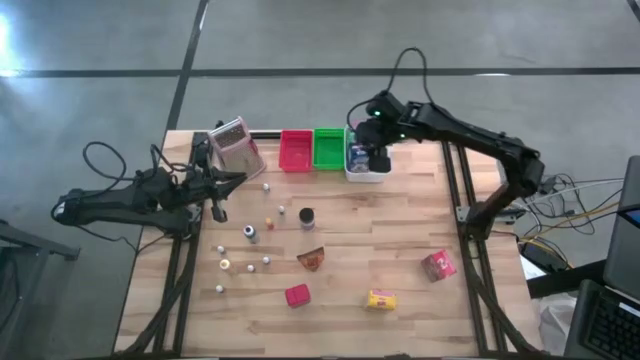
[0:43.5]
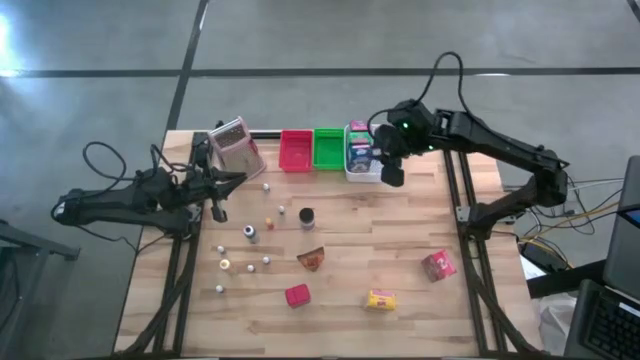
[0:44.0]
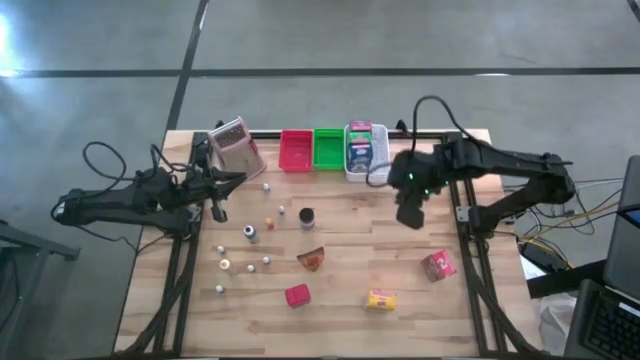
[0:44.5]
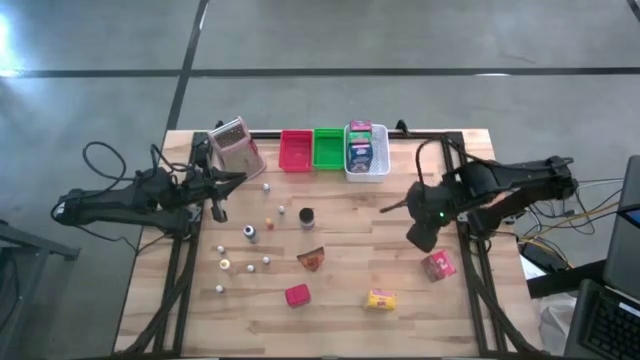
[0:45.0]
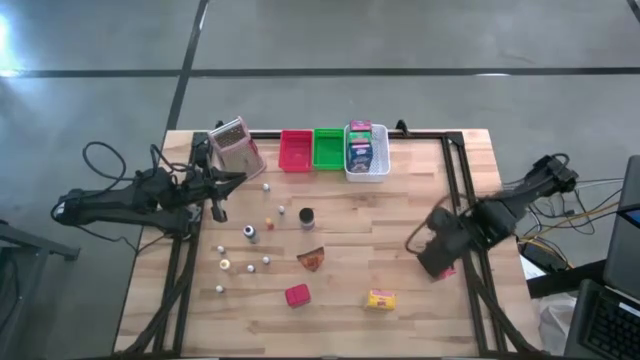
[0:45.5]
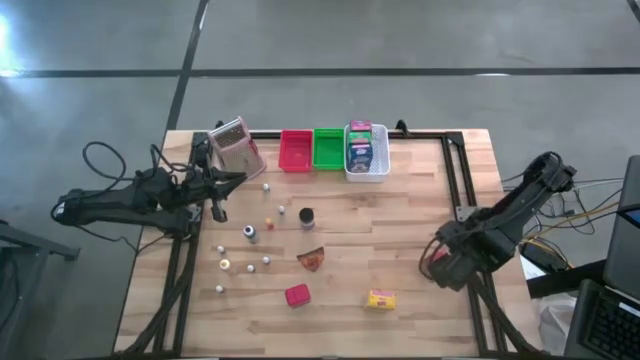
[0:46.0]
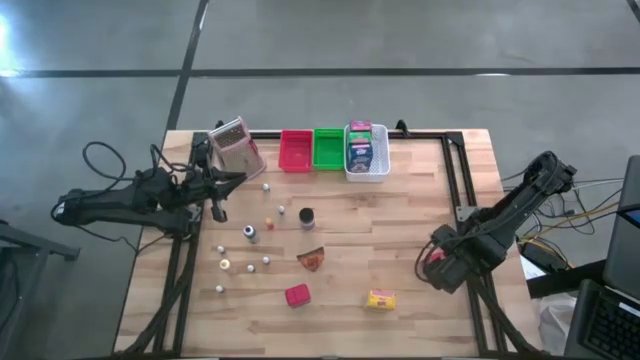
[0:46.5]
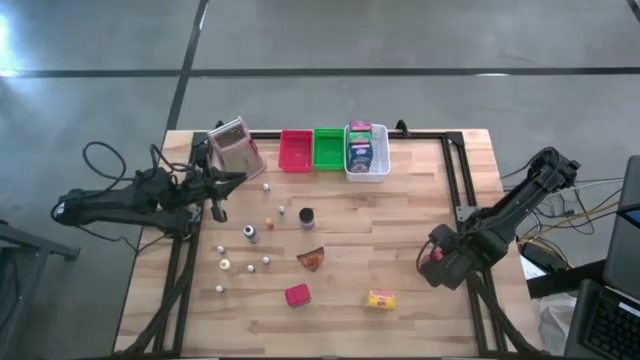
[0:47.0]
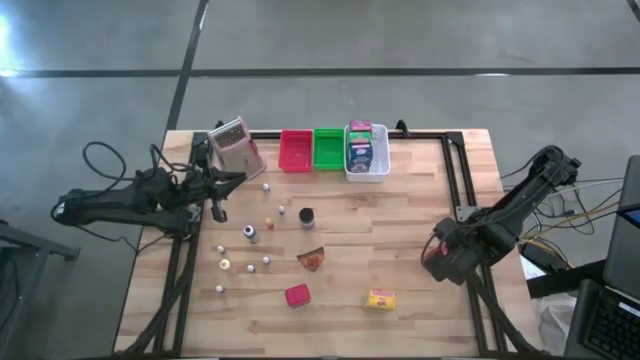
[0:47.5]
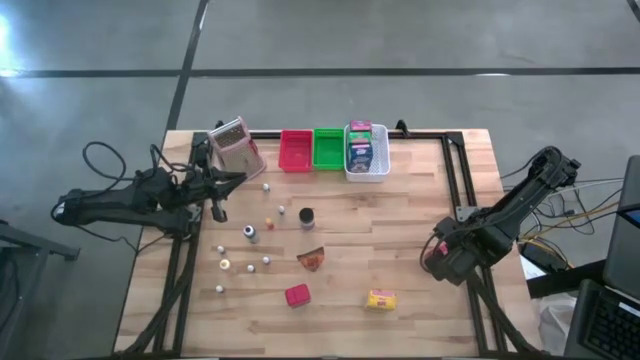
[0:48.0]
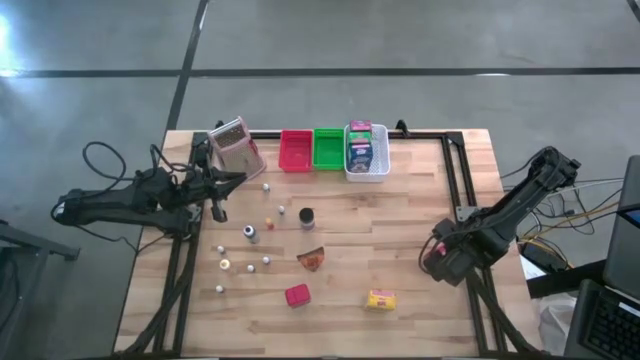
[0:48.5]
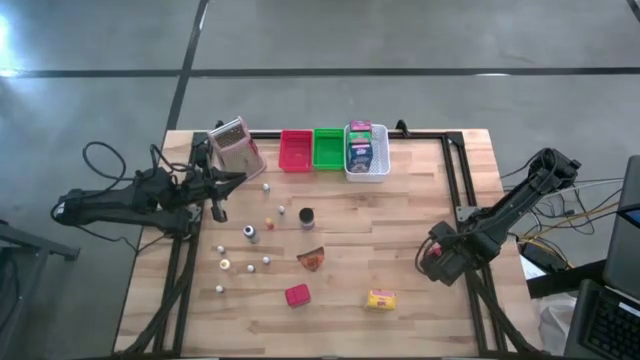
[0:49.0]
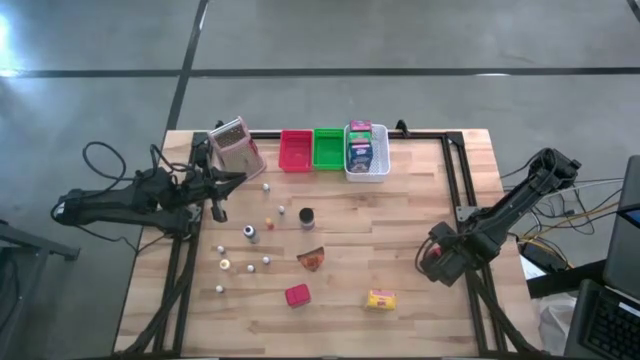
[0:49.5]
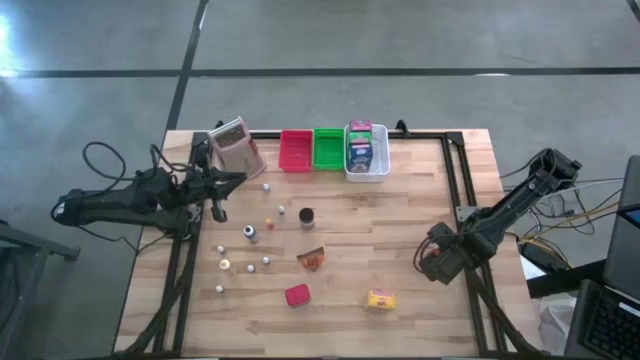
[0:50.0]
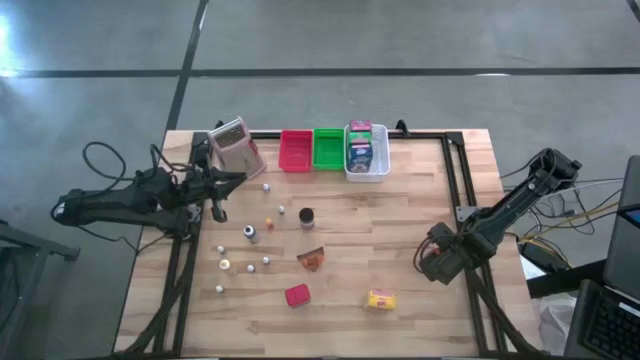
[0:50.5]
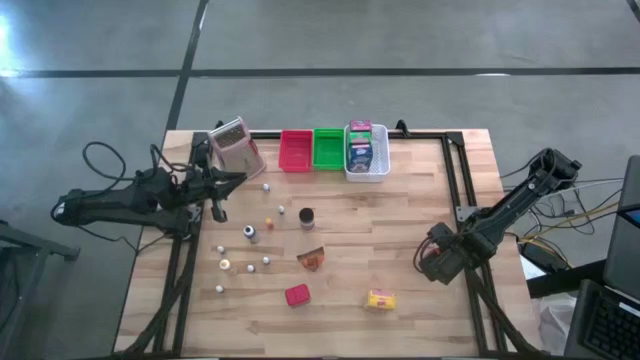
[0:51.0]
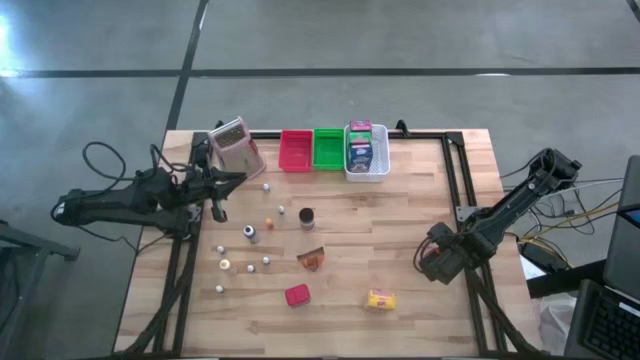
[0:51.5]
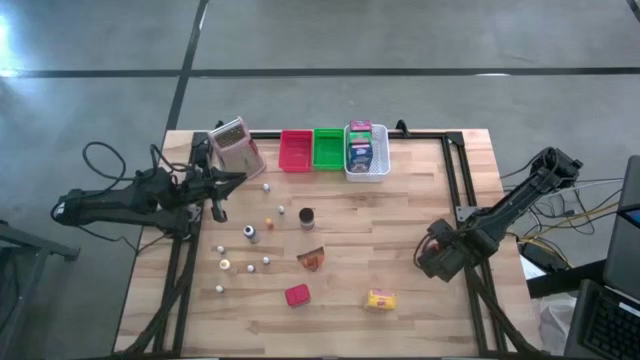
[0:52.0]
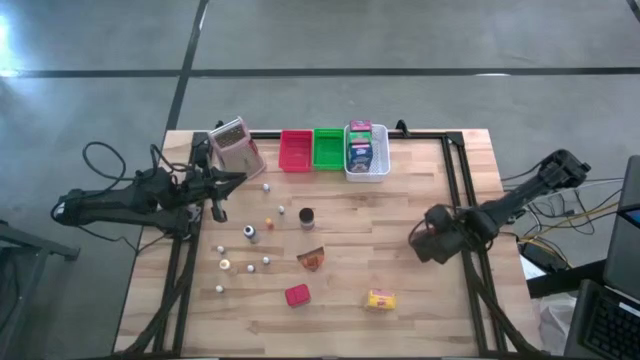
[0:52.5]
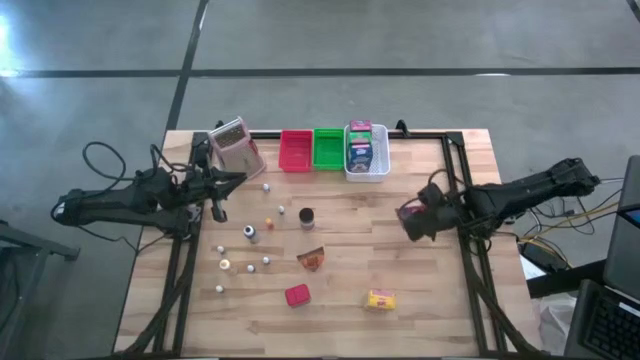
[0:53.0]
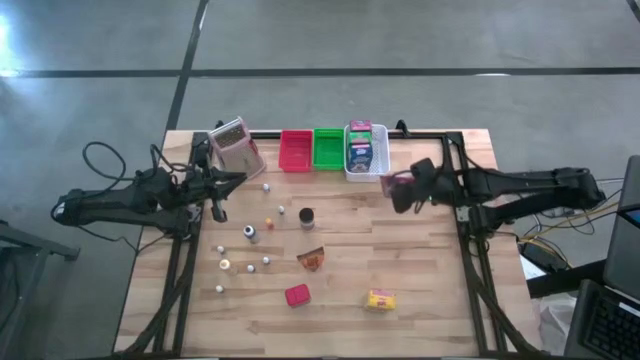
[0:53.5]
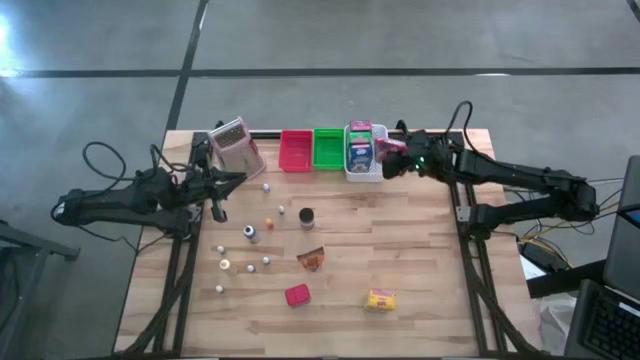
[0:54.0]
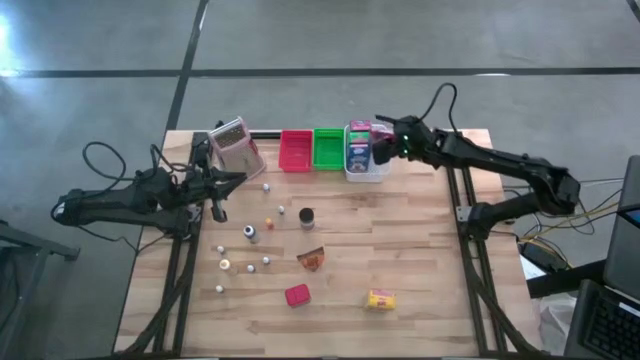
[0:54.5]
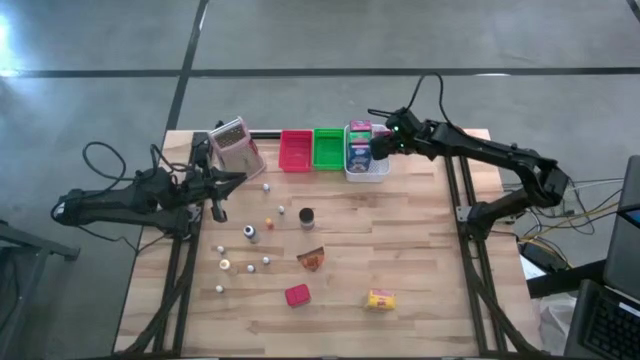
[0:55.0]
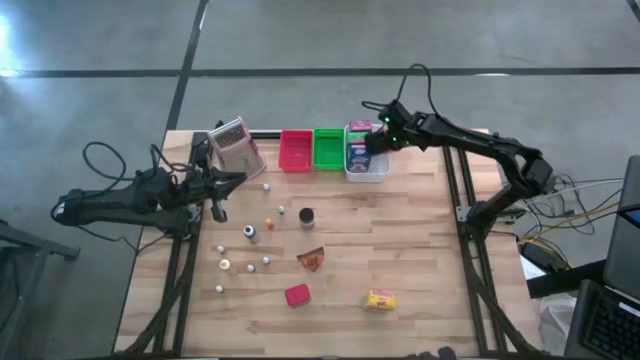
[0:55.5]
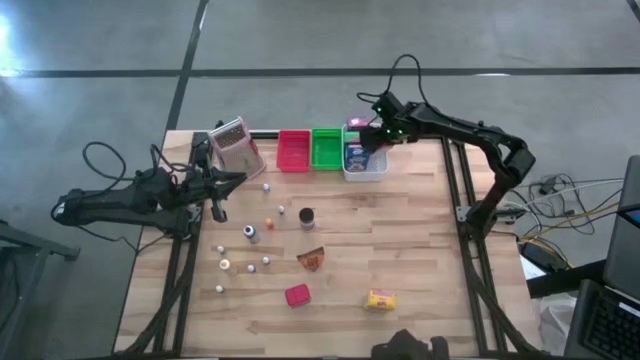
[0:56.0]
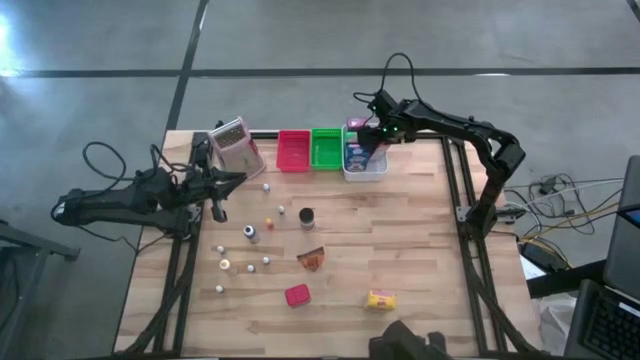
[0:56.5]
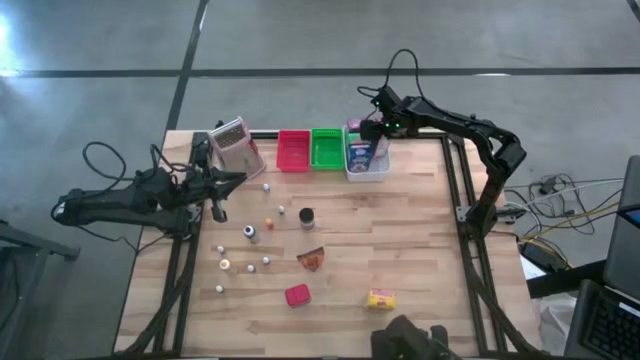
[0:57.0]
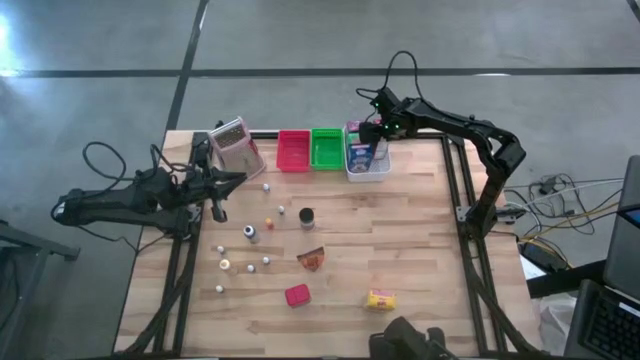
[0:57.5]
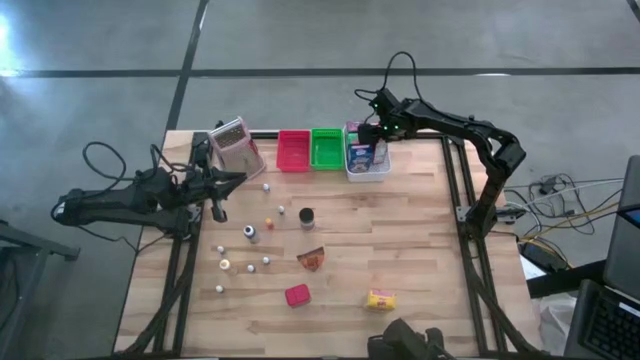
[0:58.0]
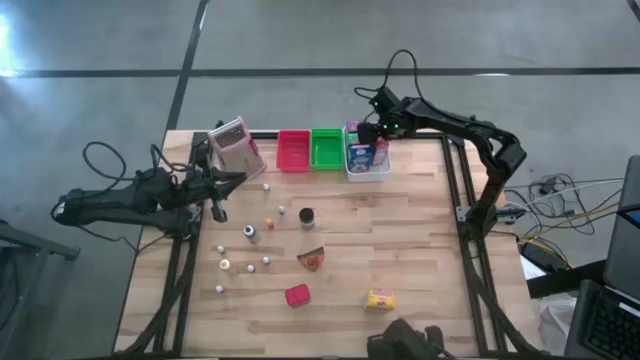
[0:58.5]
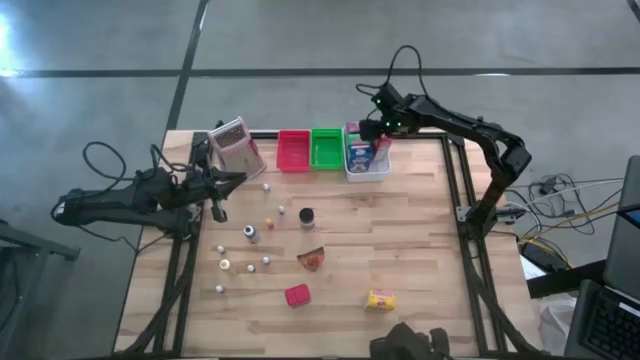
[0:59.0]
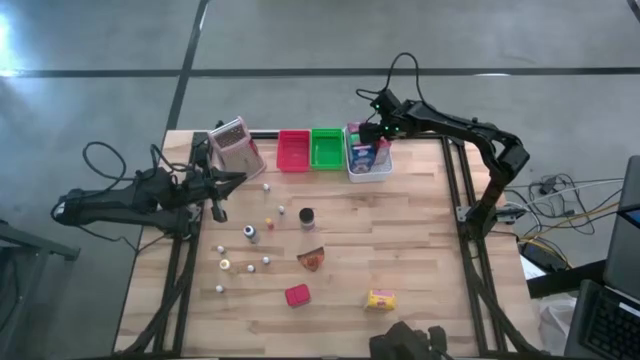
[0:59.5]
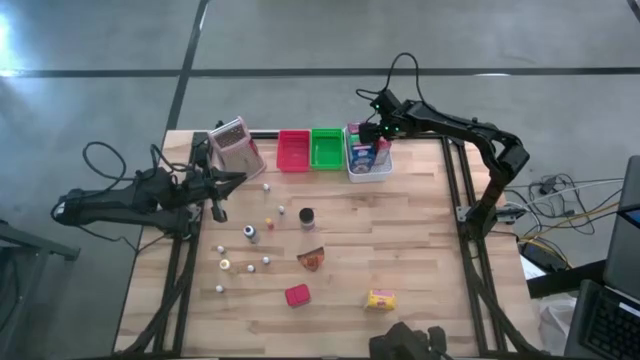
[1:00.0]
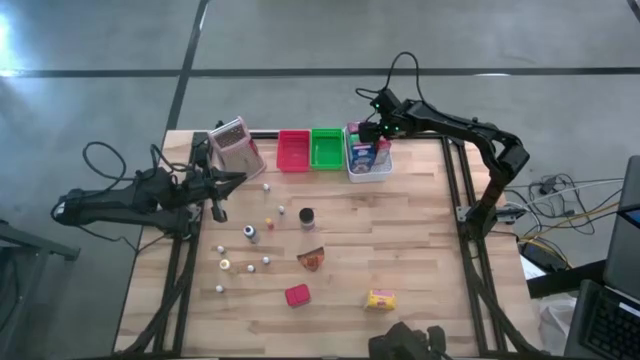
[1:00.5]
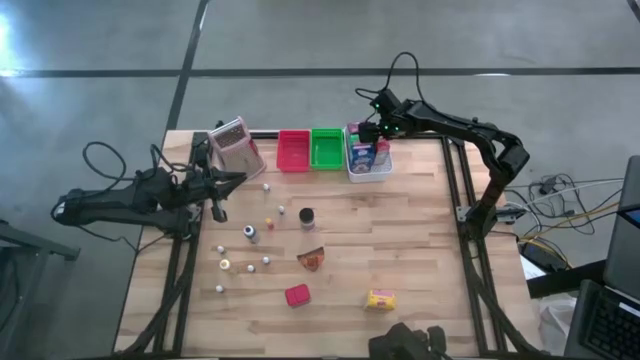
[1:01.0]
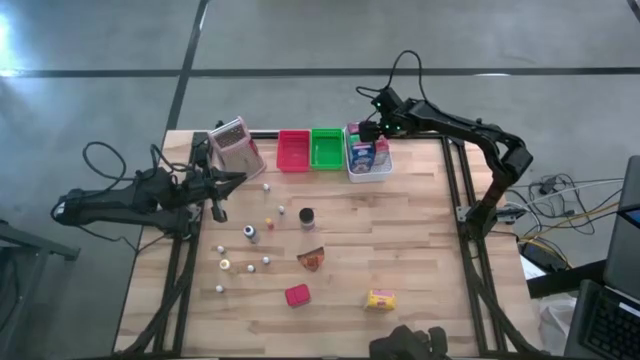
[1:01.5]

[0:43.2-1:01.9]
Task: Pick & Place Kitchen Items
Put the red cereal box into the white bin

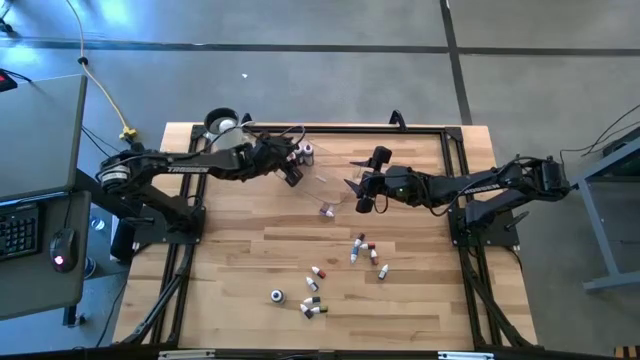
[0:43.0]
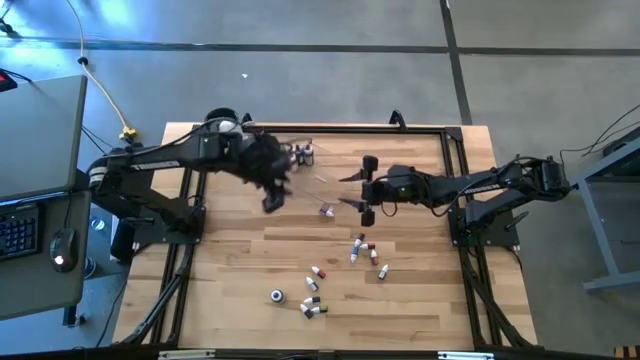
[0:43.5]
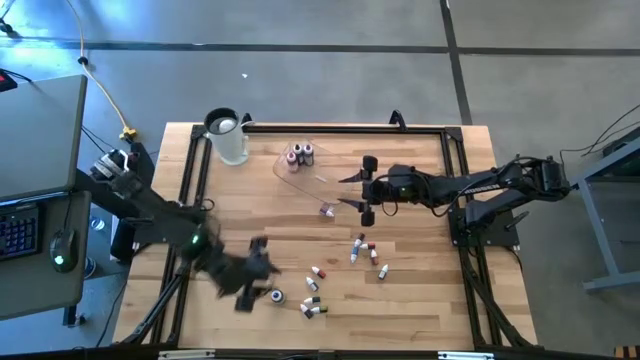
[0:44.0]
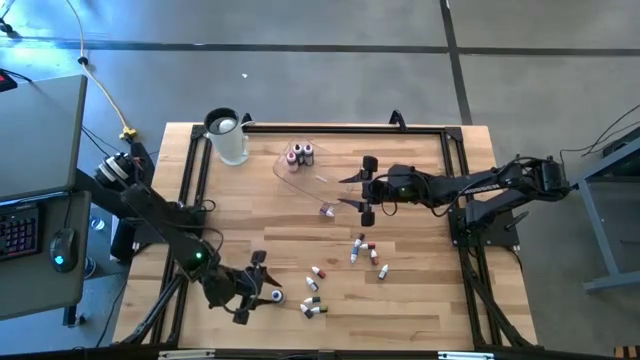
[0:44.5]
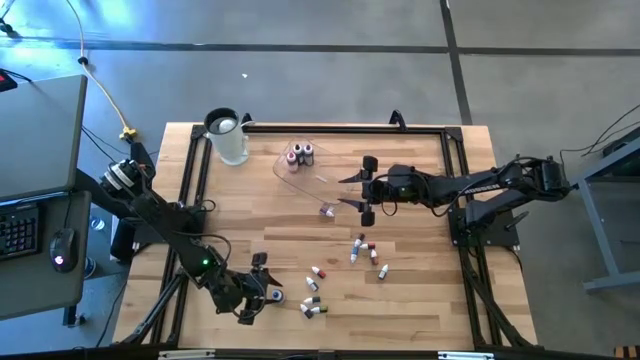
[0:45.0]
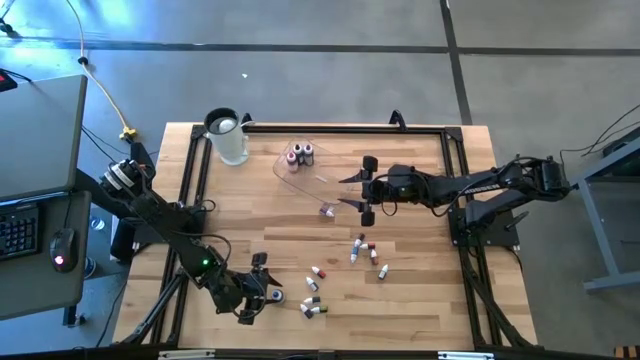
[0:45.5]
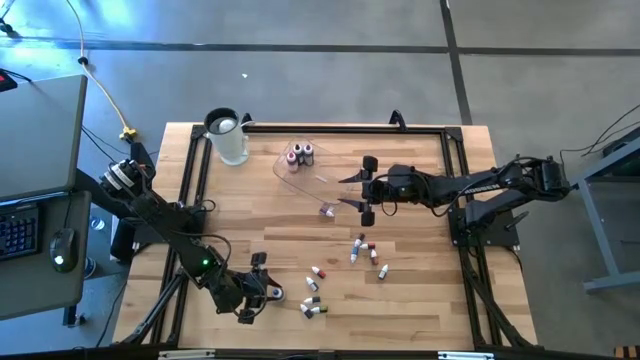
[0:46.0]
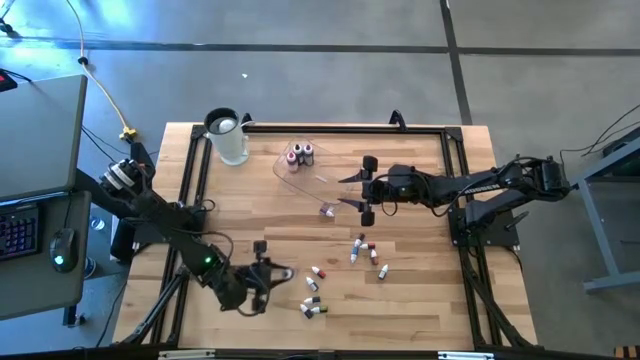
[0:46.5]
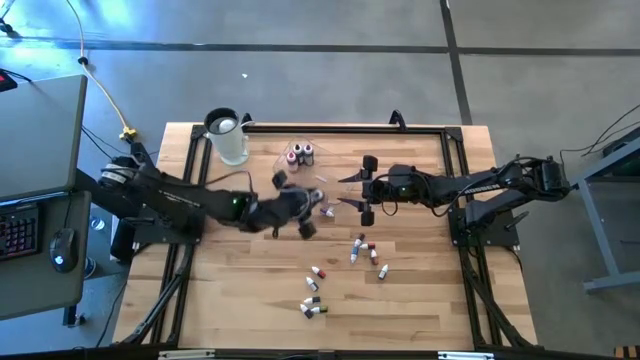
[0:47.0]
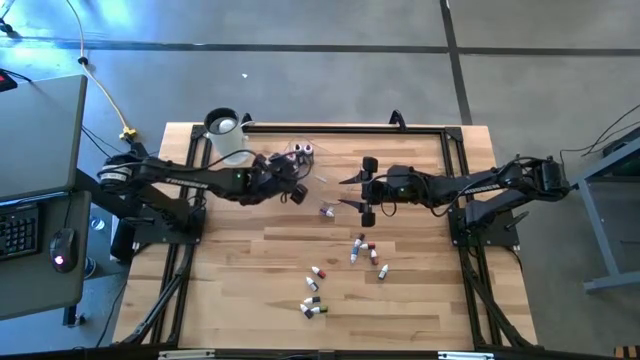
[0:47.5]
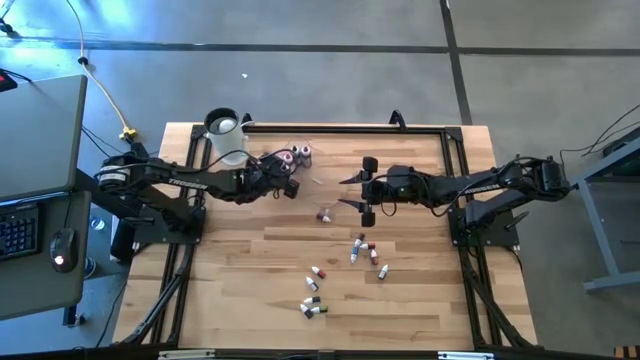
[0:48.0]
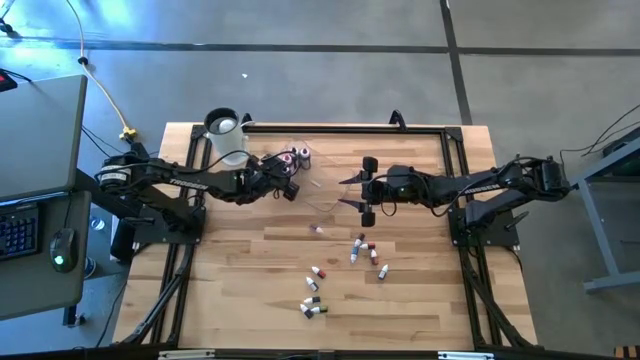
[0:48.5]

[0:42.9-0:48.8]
Task: Pick & Place food coloring
Put the large blue food coloring bottle into the bin
